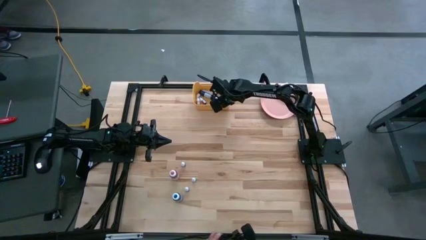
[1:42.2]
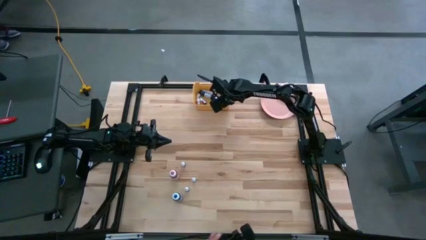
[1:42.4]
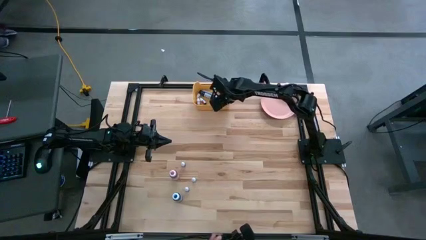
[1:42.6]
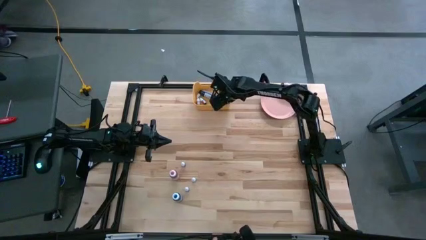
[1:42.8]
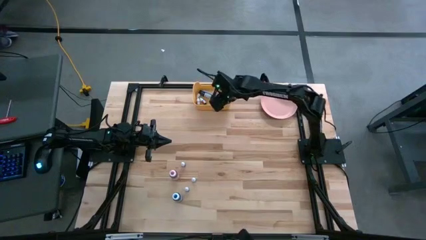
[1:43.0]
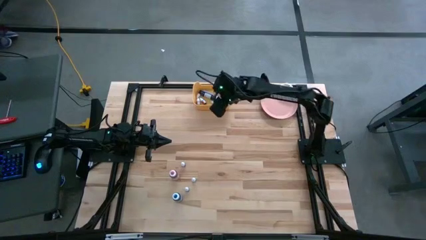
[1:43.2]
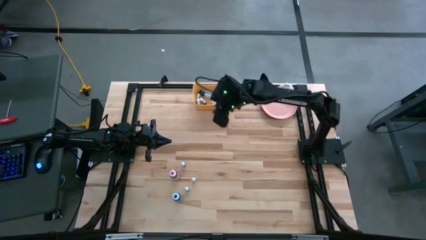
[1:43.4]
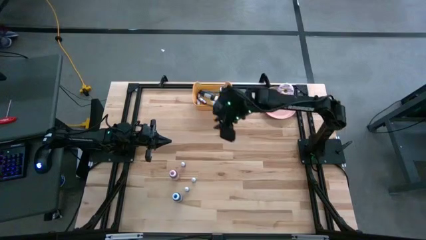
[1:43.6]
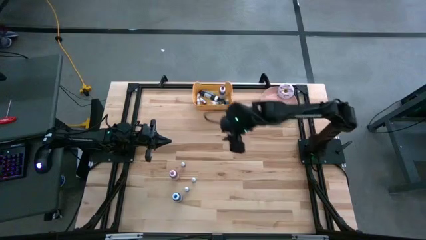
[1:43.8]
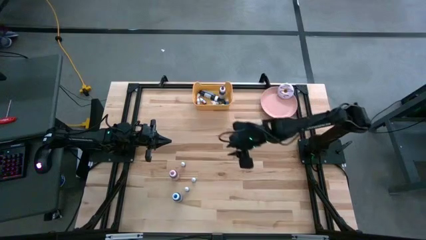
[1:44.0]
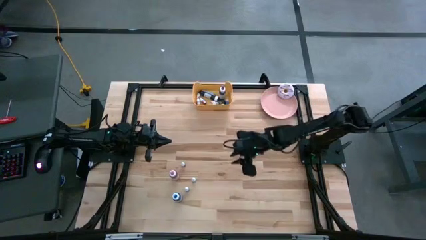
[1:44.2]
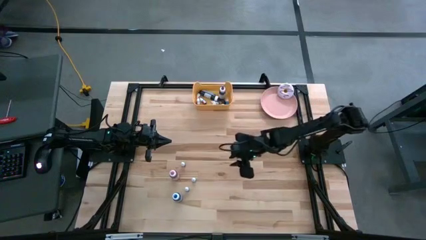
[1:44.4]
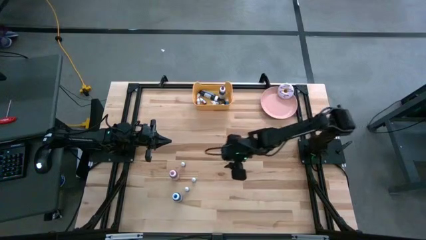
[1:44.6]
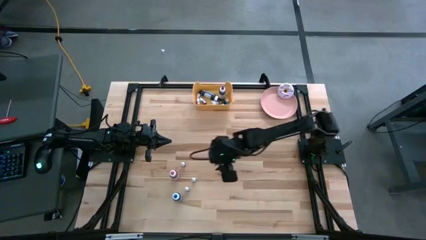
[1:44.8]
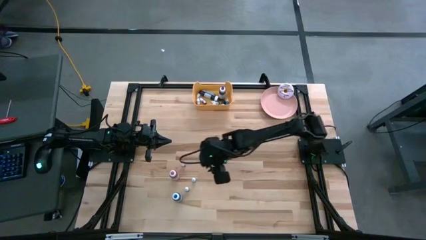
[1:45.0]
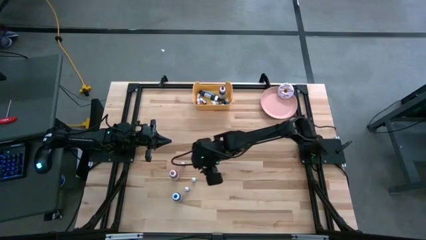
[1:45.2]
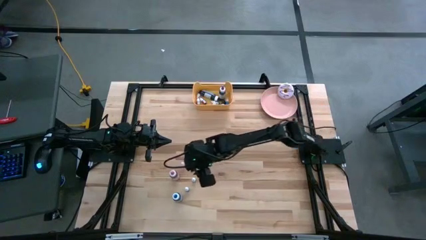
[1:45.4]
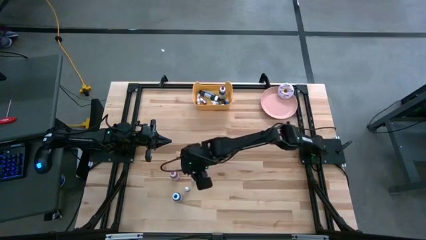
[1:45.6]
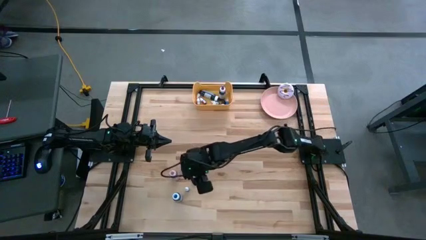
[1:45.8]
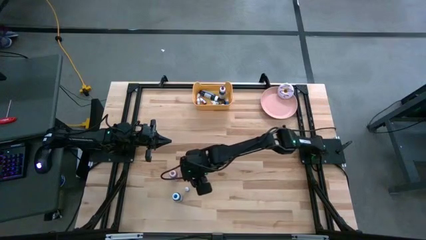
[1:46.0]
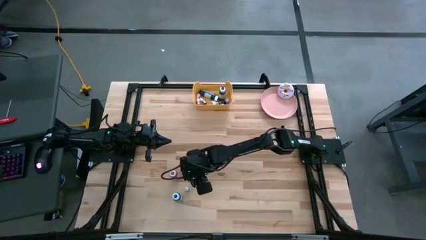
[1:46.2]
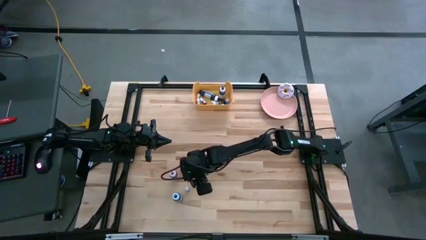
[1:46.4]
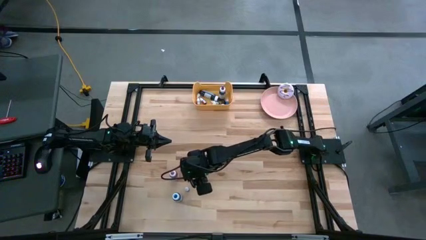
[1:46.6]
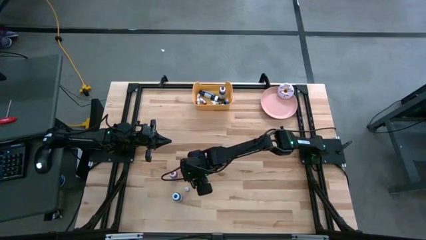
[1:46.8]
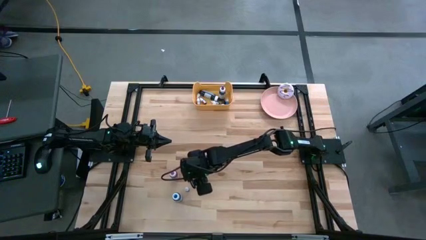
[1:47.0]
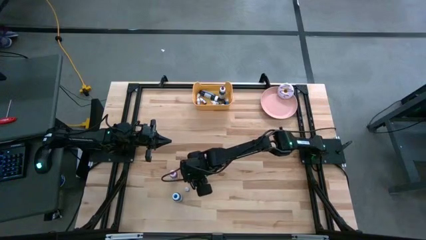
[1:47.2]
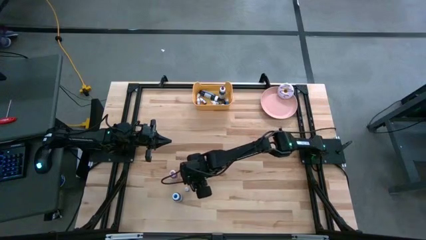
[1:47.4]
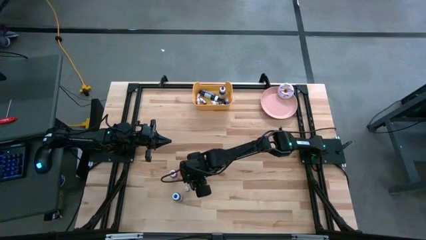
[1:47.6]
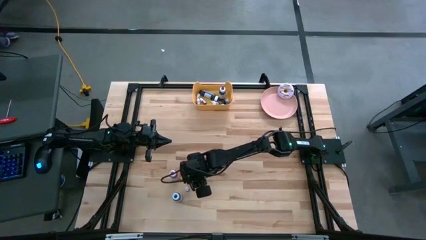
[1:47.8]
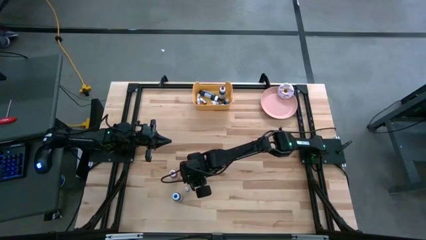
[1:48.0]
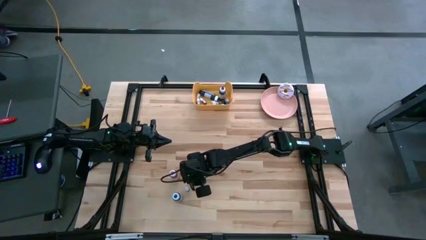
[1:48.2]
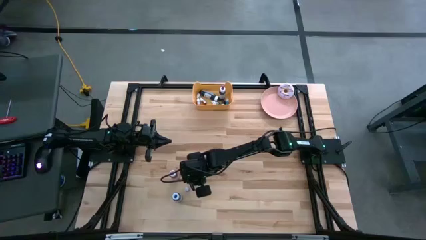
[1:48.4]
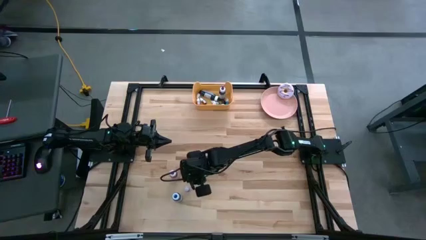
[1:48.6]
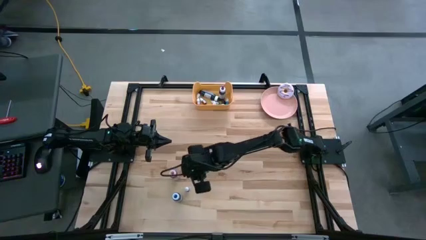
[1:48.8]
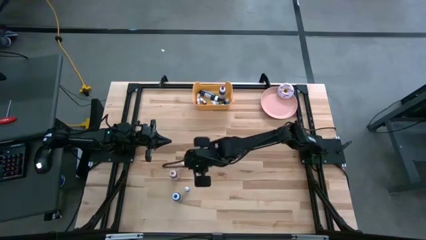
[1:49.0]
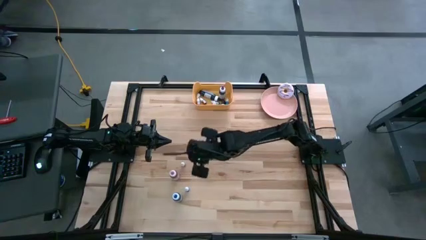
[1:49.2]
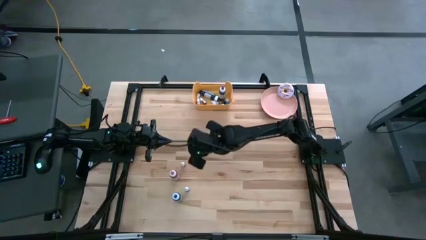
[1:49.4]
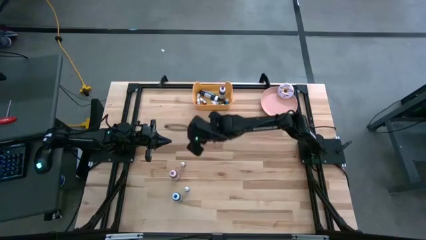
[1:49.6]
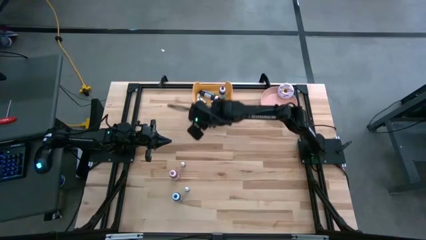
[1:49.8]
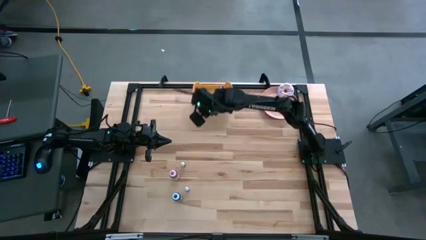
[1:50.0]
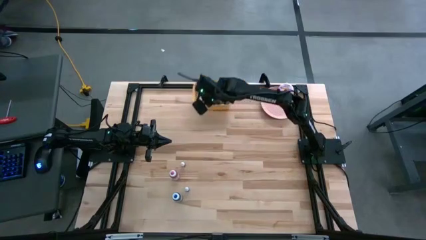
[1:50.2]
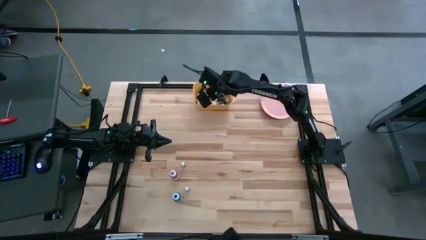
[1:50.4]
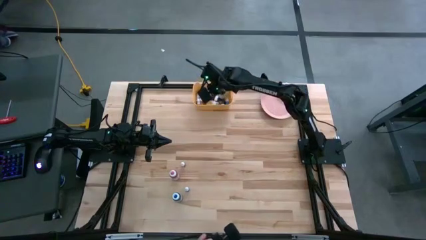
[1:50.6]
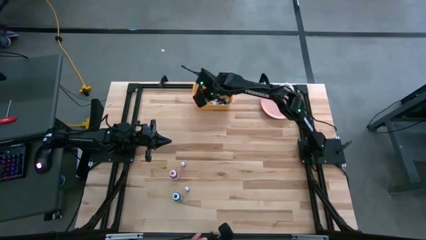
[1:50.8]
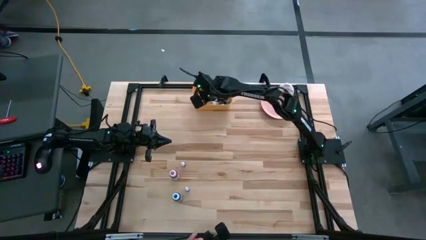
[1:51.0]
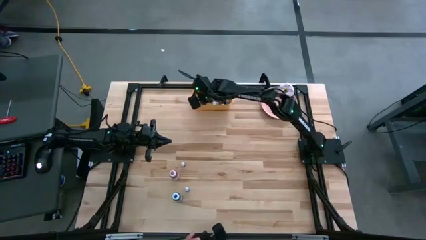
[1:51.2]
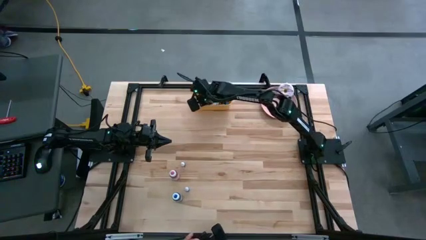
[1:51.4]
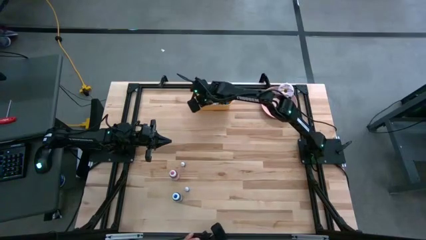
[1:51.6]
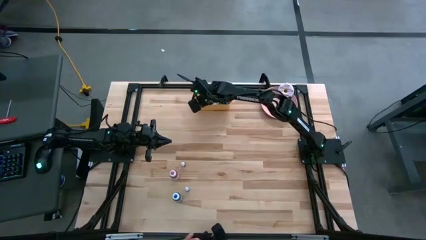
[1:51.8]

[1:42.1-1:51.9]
Task: Pick & Place food coloring
Put the small green food coloring bottle into the yellow bin

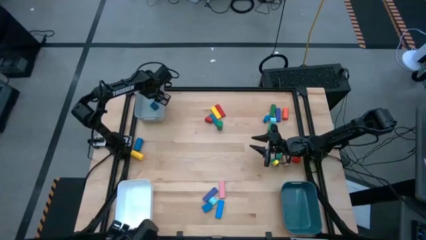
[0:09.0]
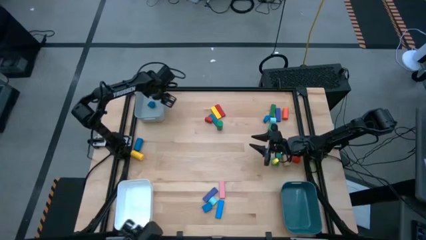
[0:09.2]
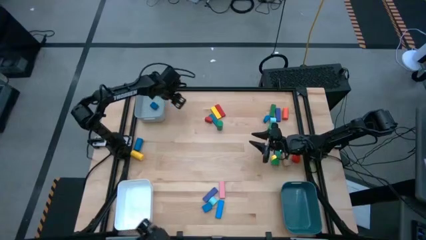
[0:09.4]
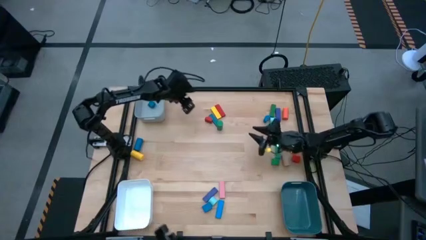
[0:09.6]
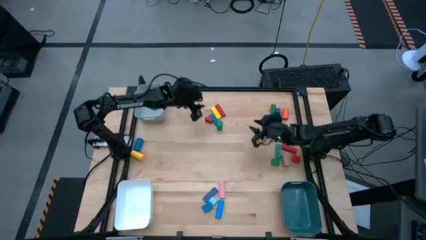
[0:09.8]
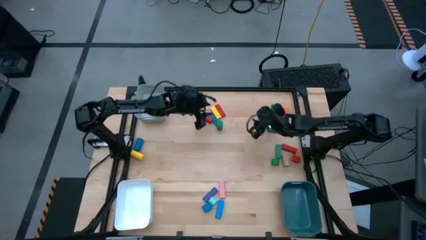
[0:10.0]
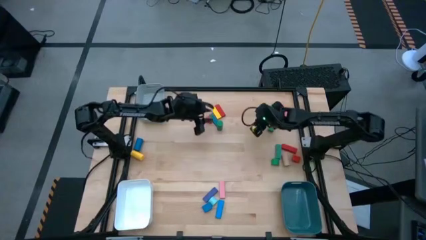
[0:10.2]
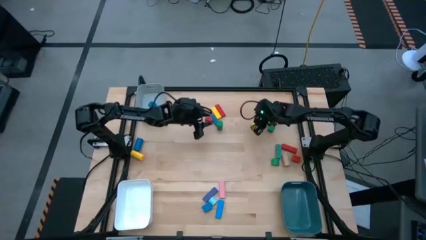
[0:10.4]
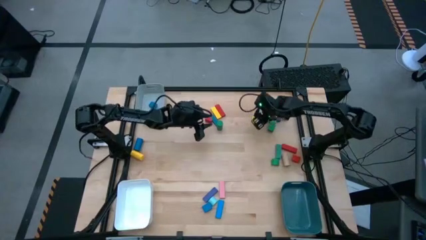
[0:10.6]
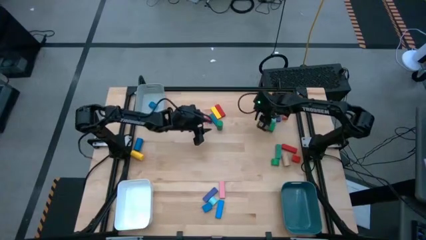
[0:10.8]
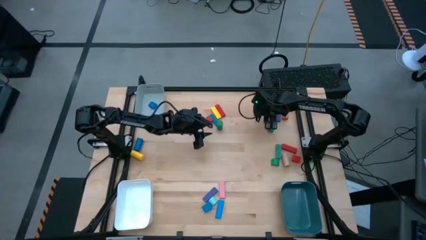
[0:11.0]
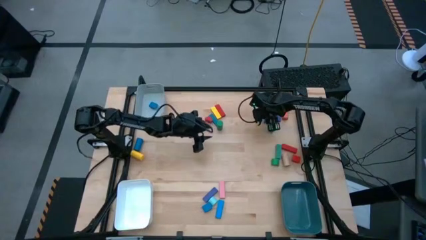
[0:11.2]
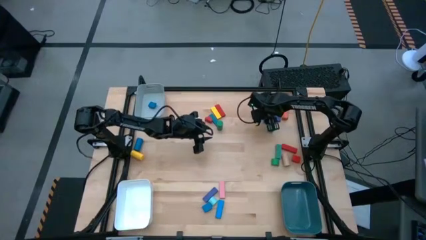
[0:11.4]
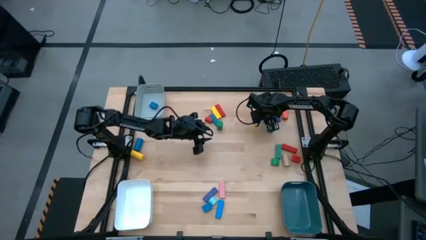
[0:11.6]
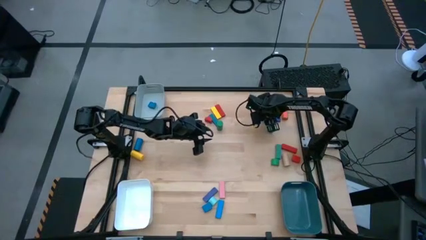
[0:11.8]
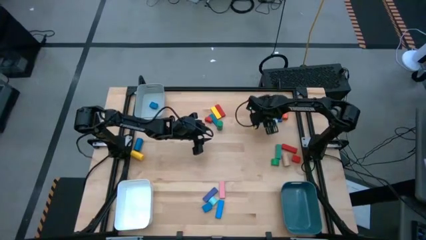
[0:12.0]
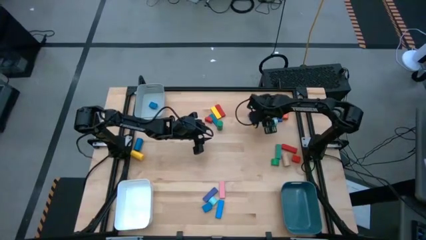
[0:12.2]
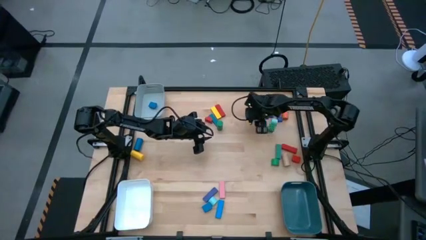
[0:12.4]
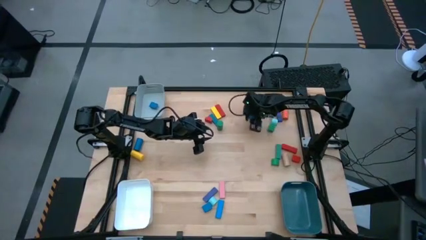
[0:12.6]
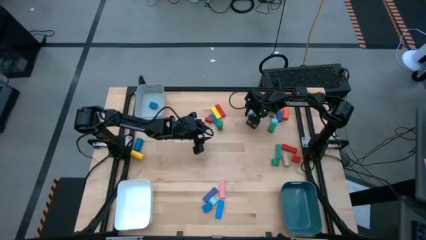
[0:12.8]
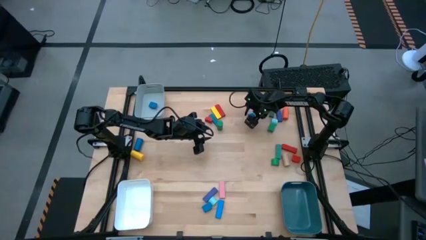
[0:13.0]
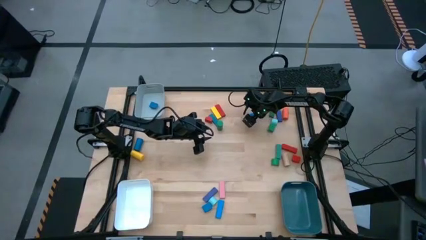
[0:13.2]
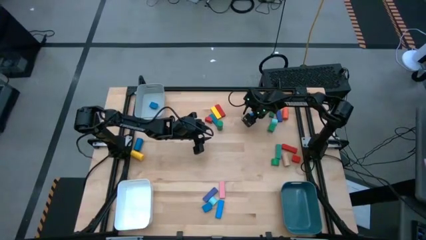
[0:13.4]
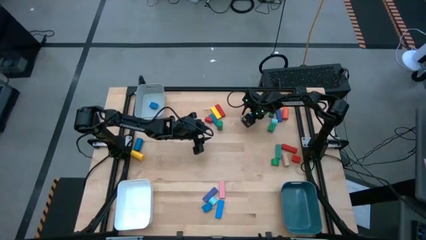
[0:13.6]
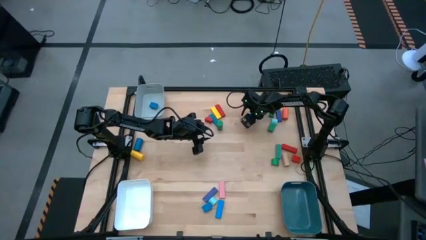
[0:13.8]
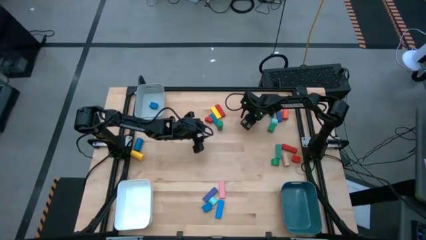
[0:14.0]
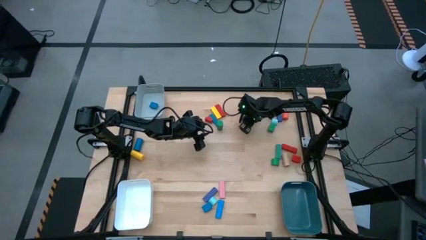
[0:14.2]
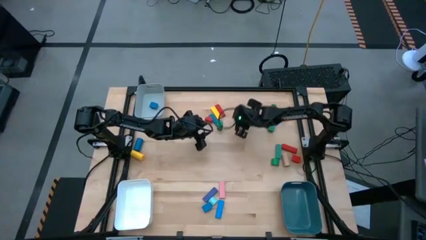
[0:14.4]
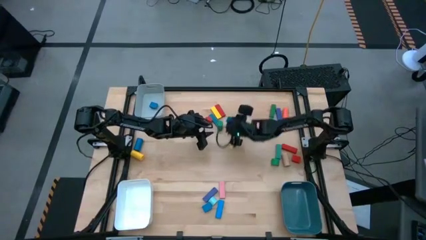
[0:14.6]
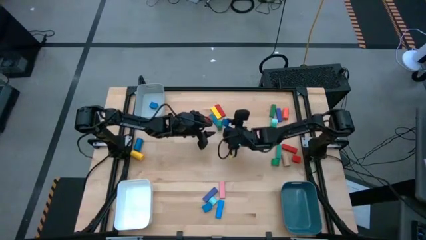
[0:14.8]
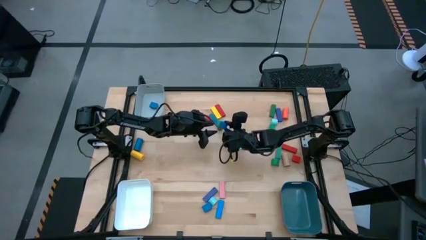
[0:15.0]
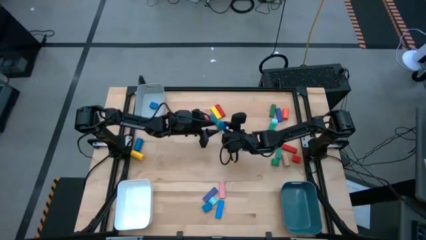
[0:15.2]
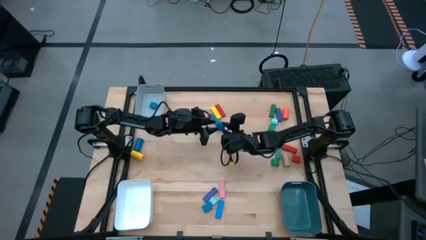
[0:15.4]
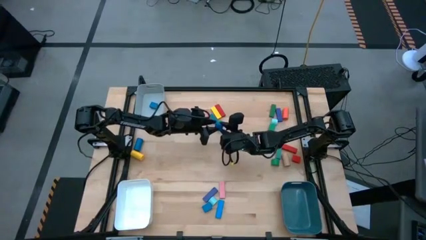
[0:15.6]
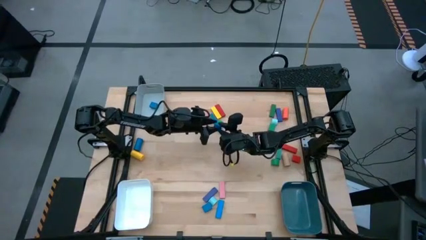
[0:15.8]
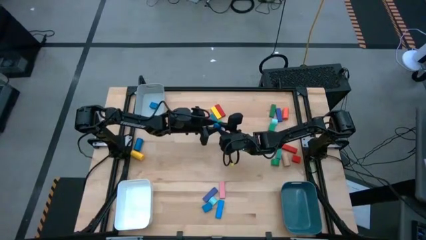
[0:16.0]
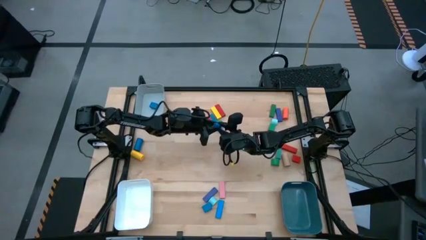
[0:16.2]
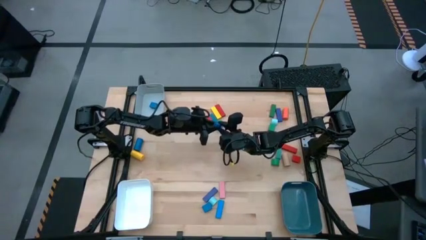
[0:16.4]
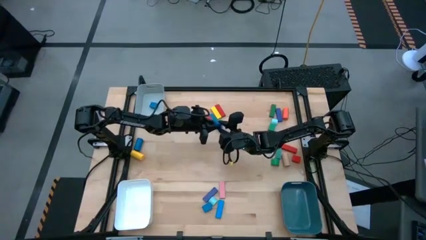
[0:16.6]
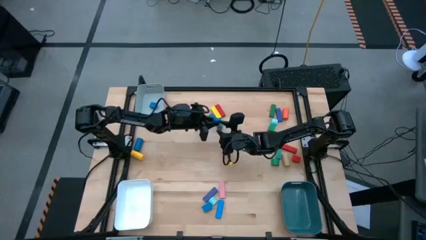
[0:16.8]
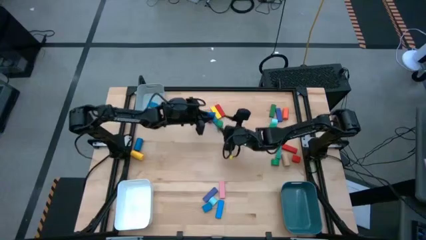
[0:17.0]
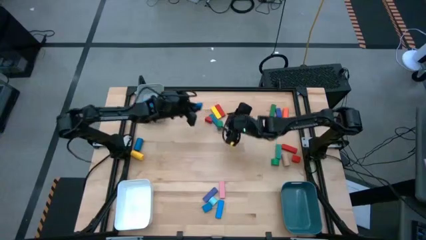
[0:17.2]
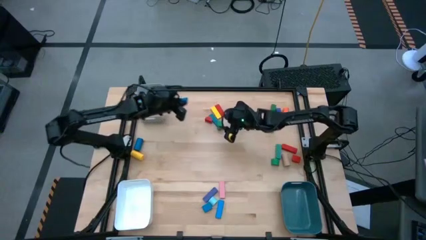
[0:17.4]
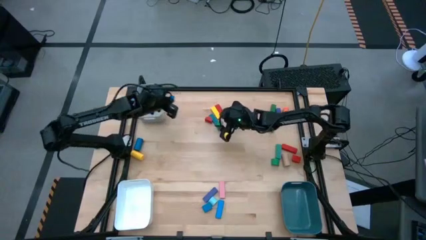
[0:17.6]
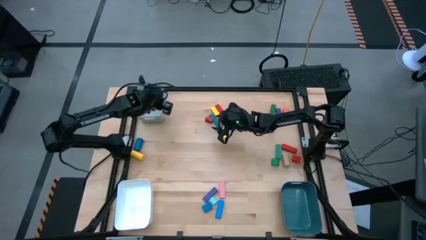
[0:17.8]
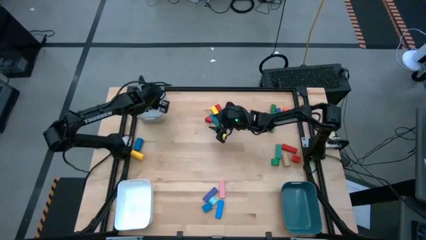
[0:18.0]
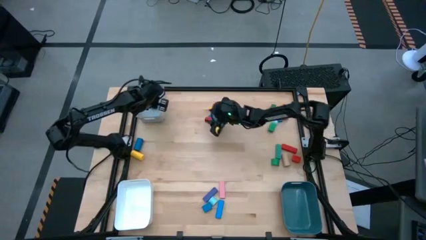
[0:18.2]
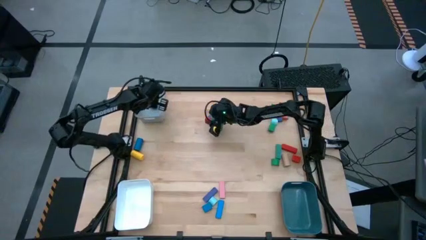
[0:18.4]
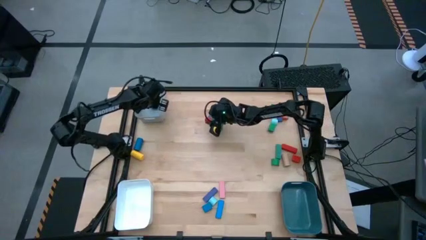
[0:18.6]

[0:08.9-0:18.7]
Task: Sort blocks by size
Put the blue half-circle block into the gray bin
